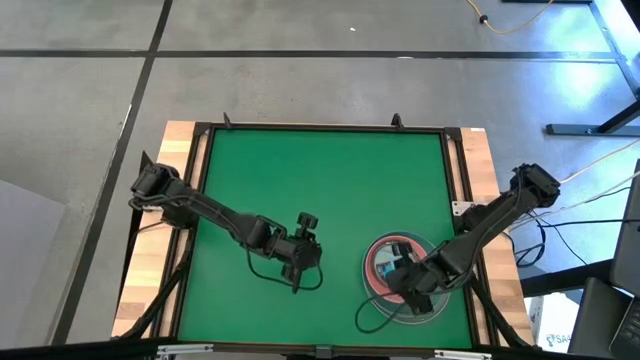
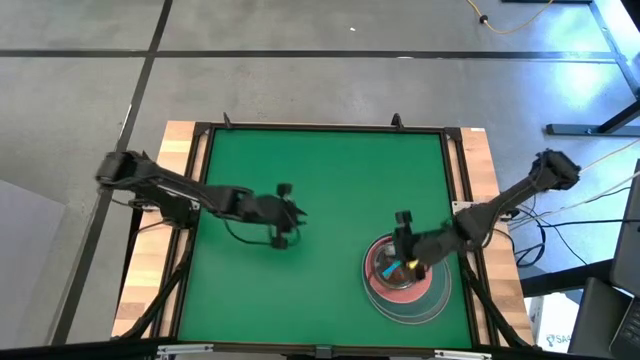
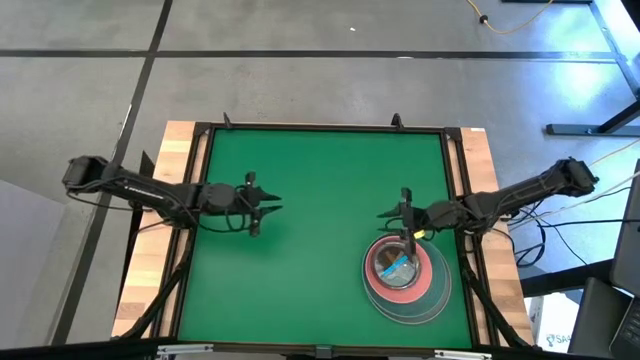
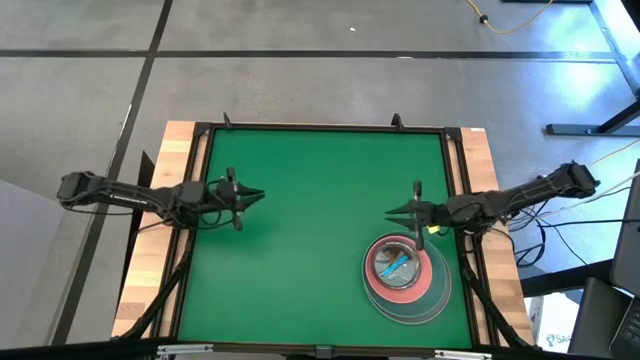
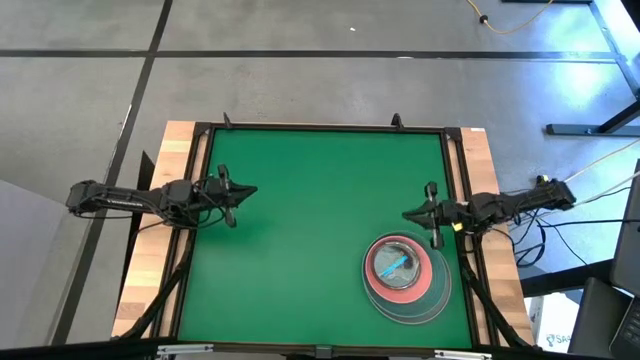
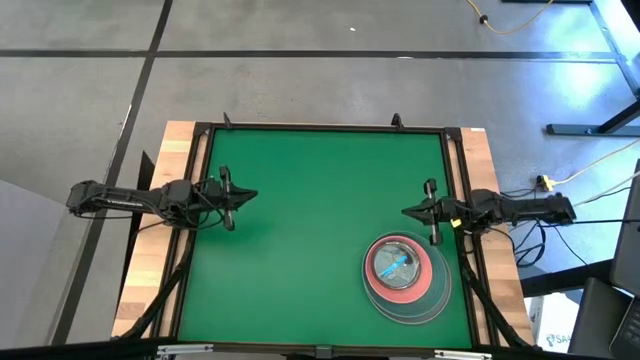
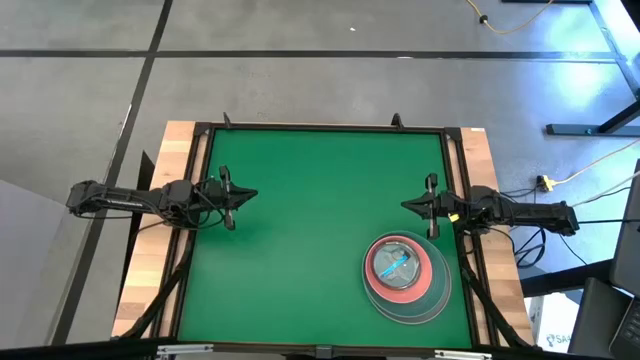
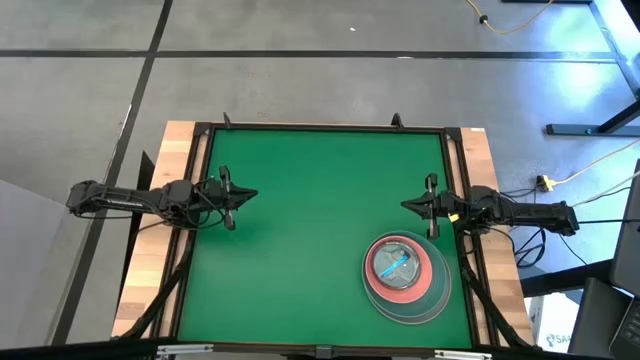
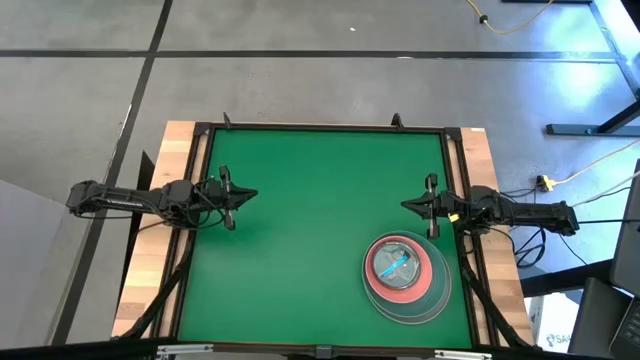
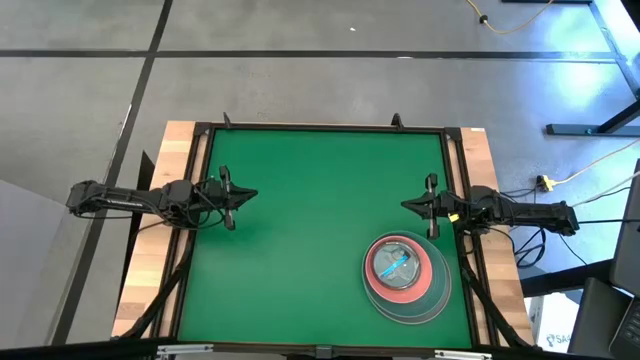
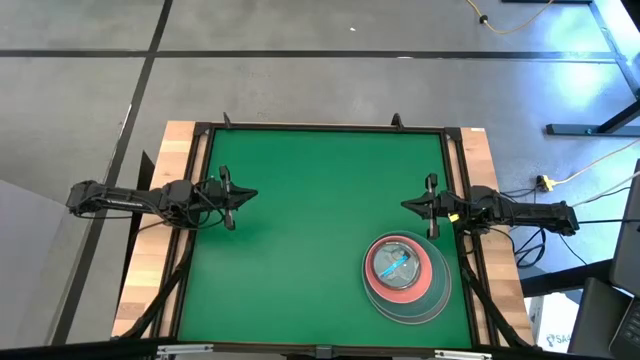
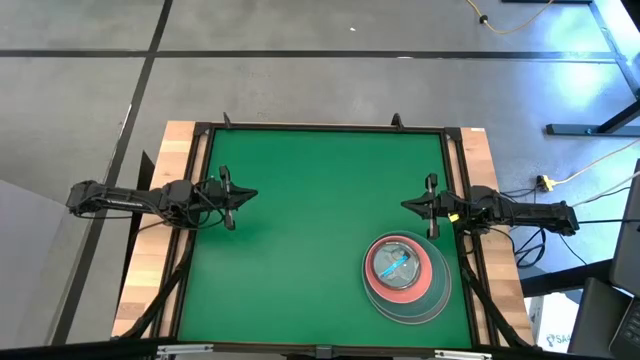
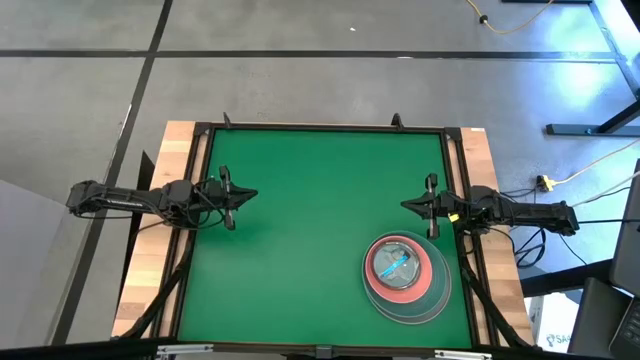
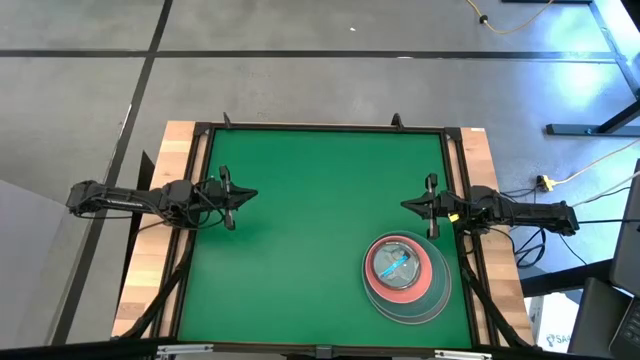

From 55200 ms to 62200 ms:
Task: Stack plastic plates
Return to Home Position

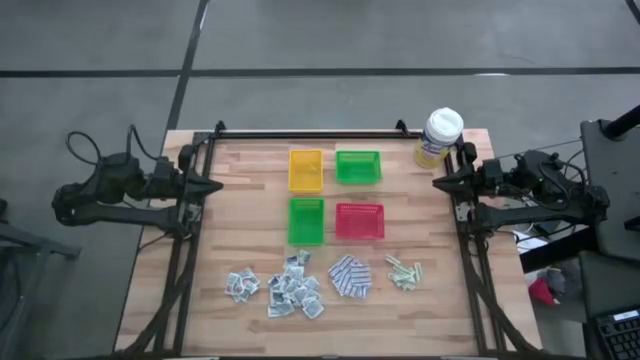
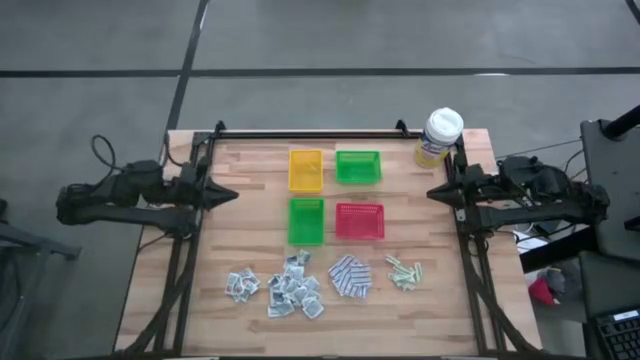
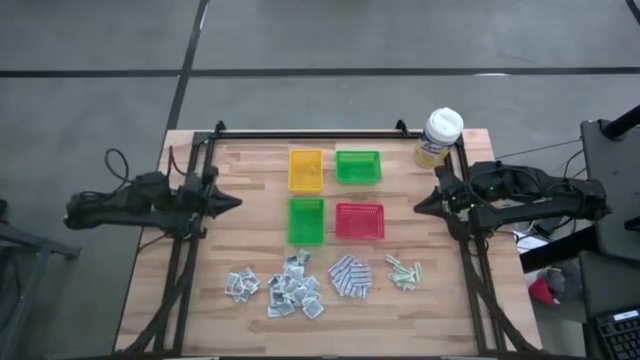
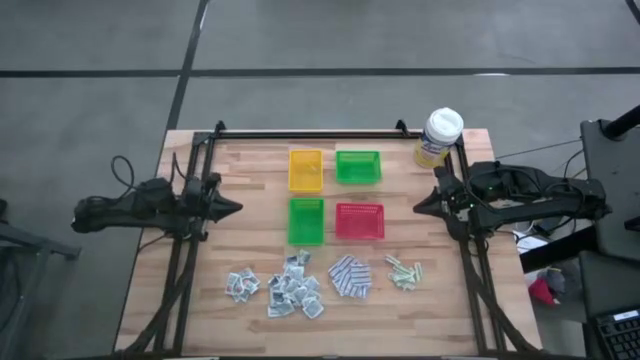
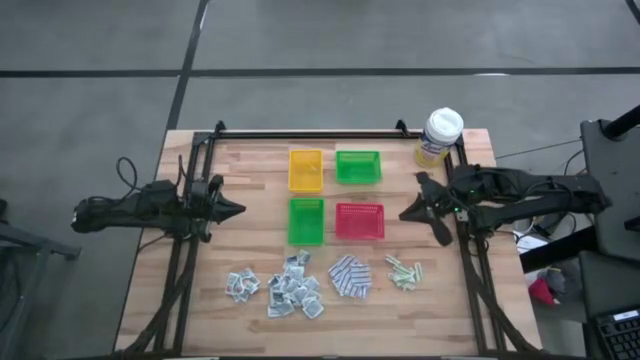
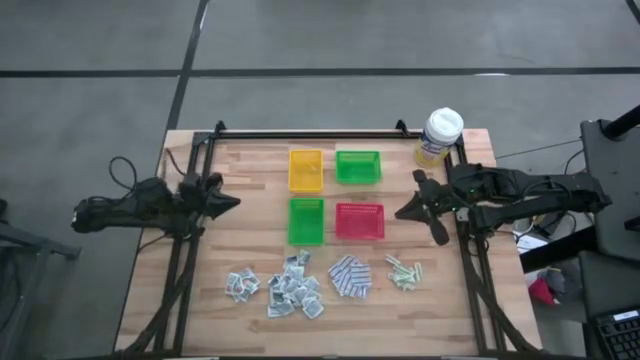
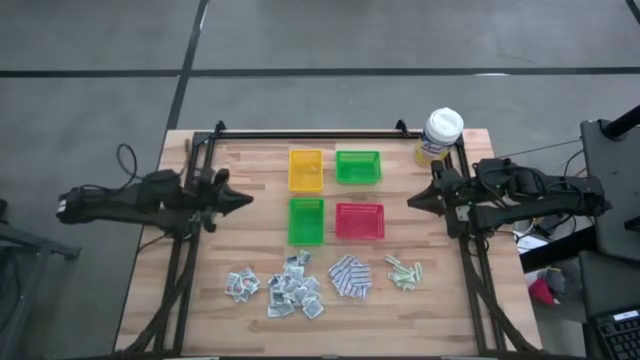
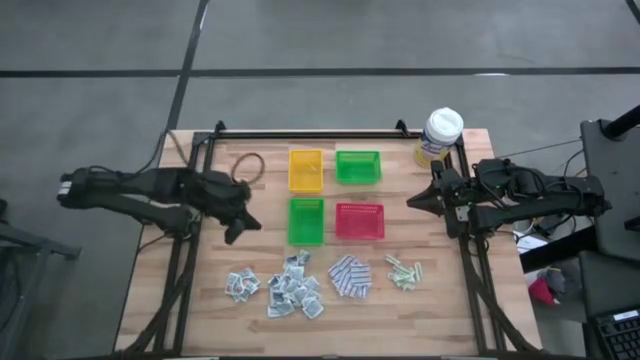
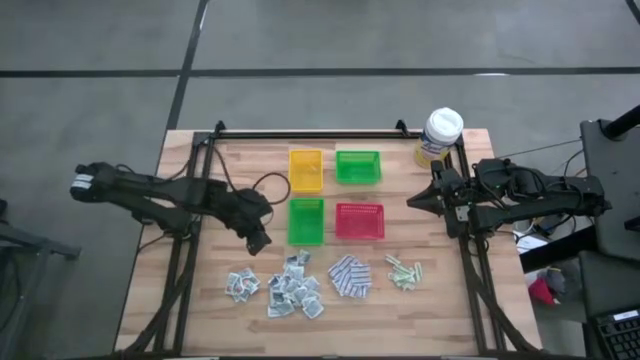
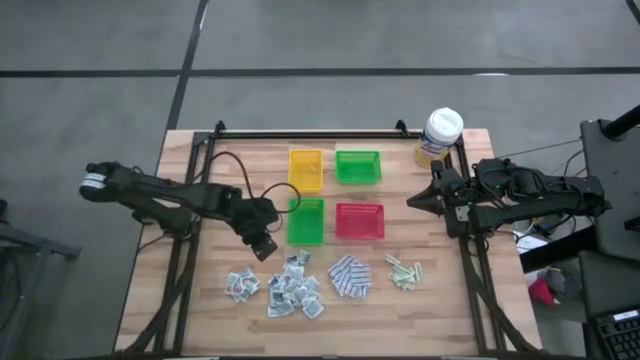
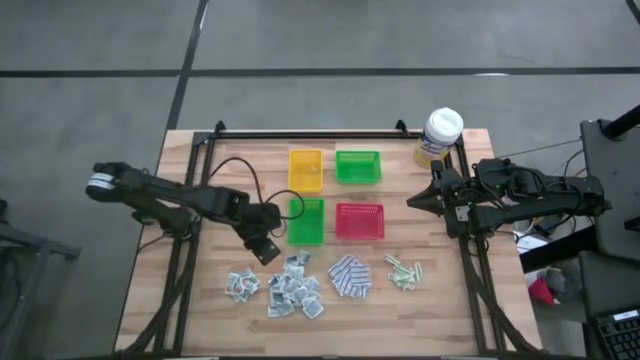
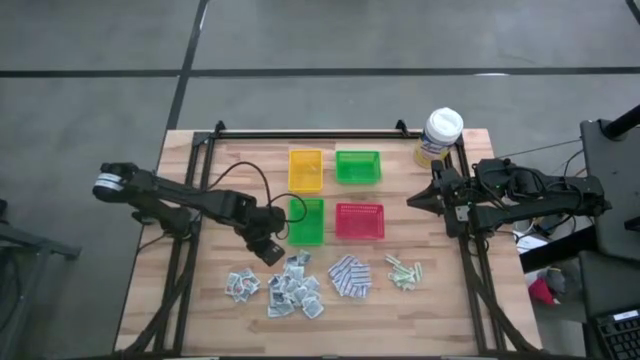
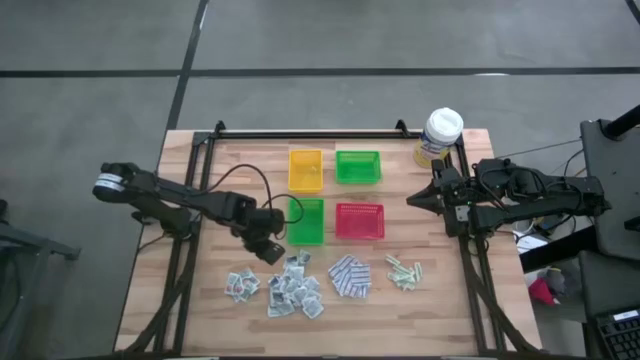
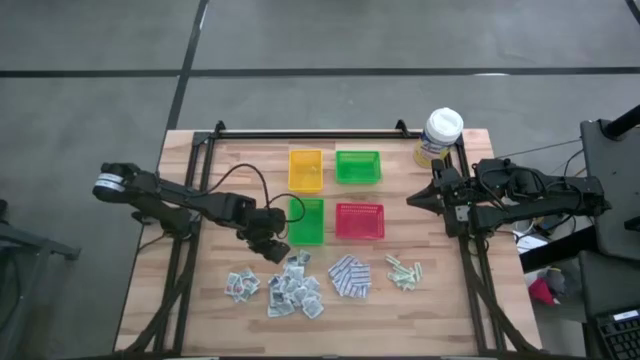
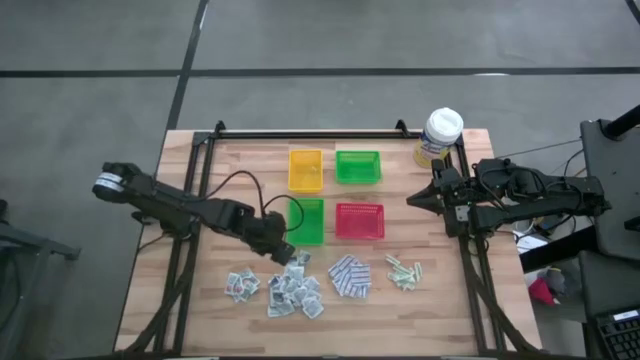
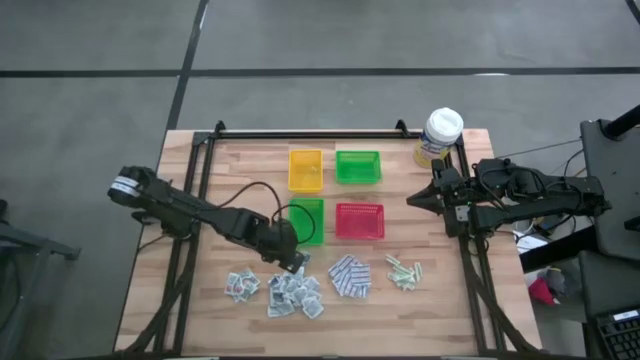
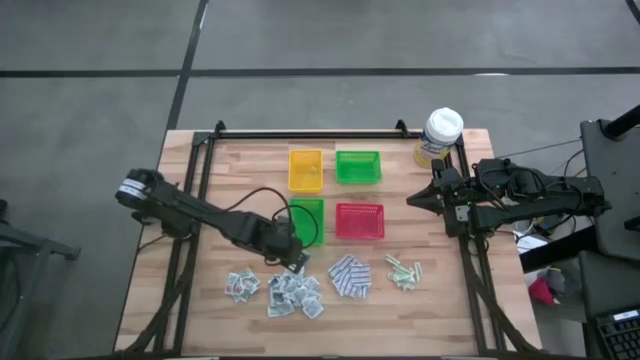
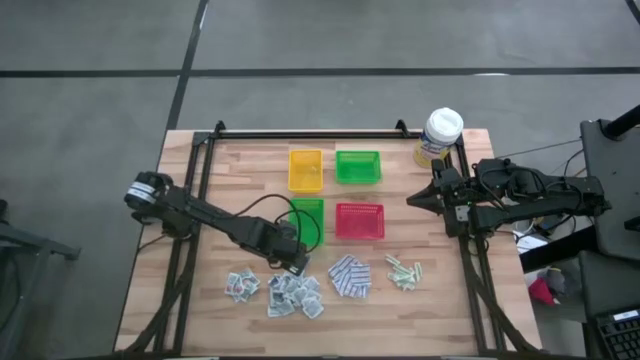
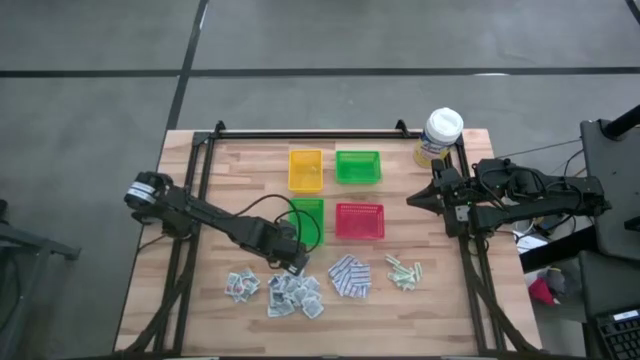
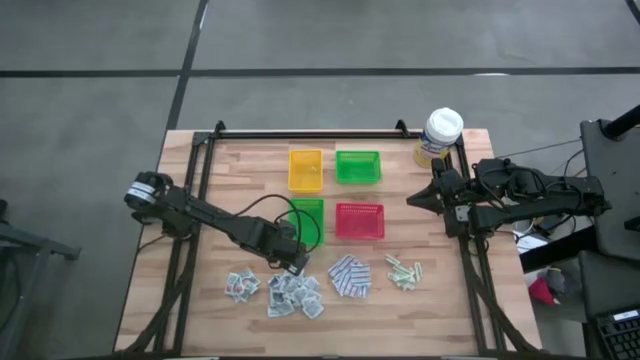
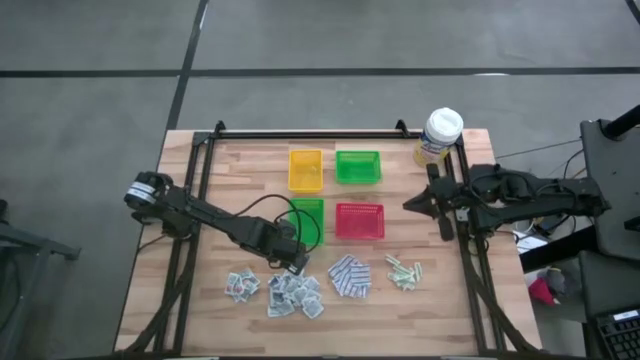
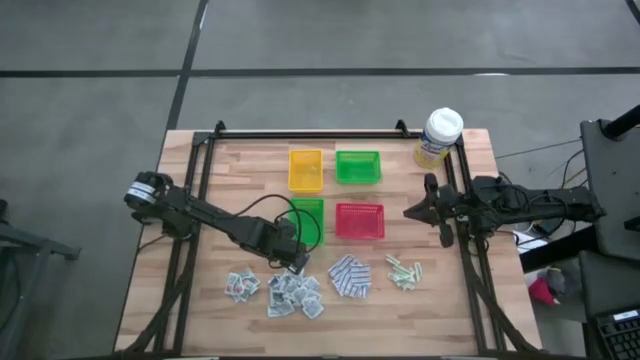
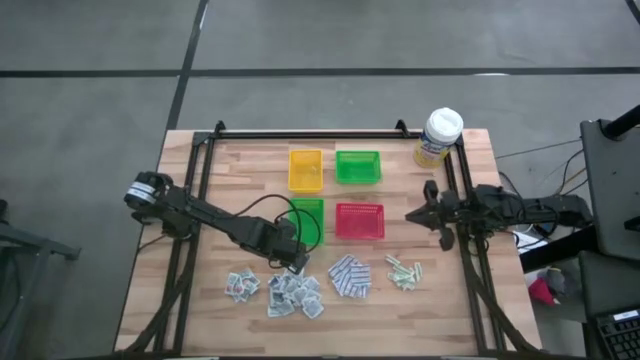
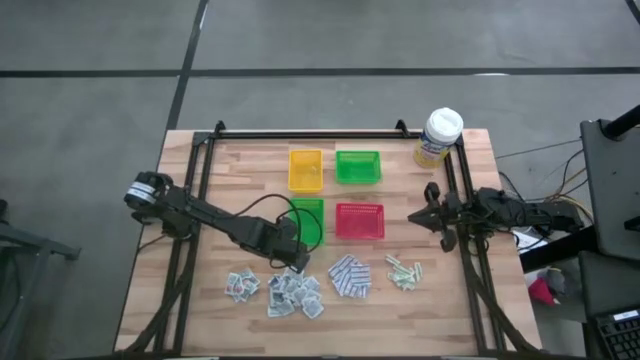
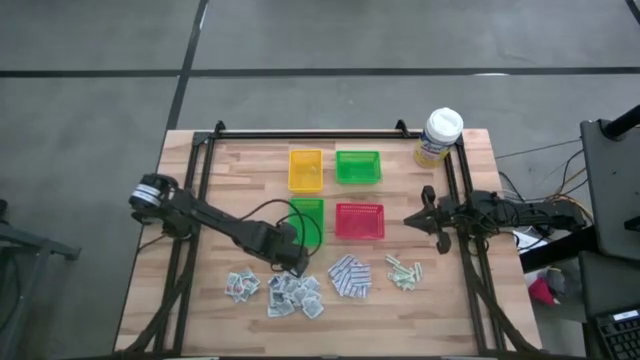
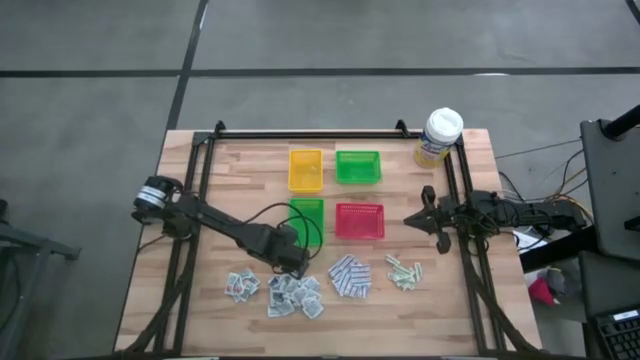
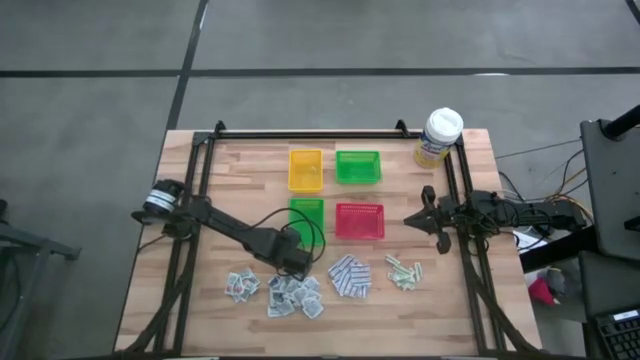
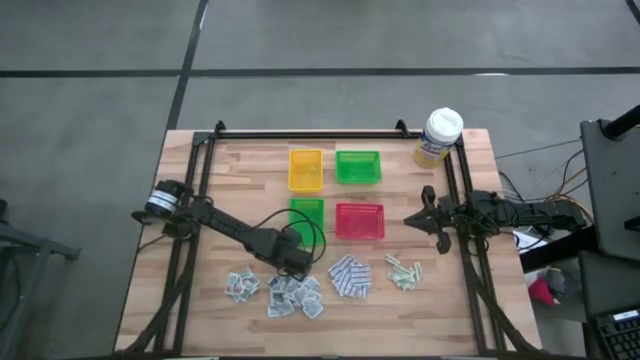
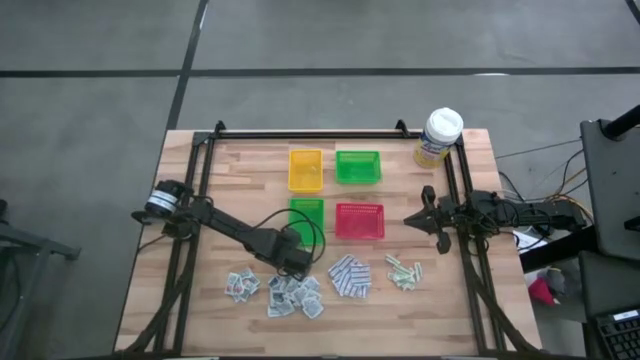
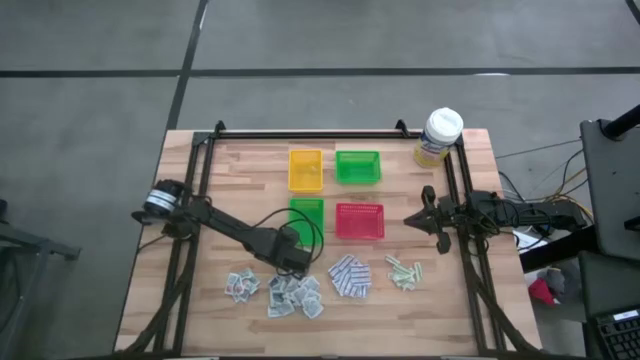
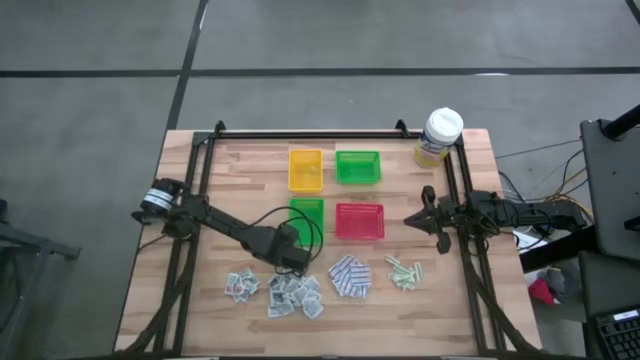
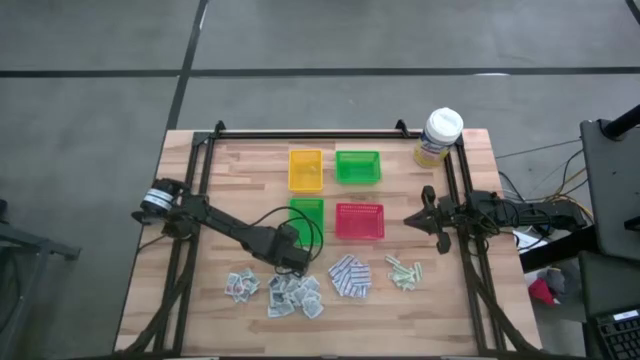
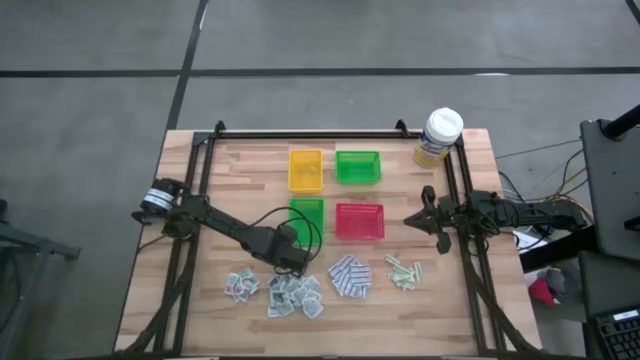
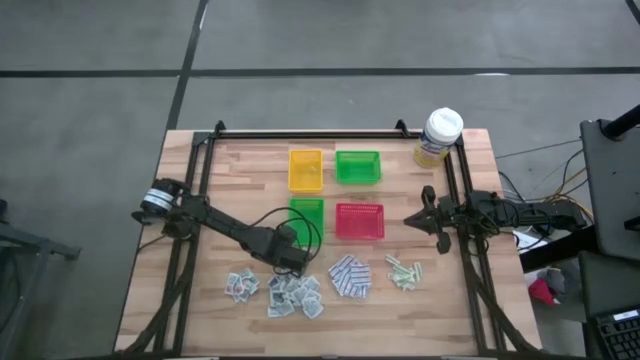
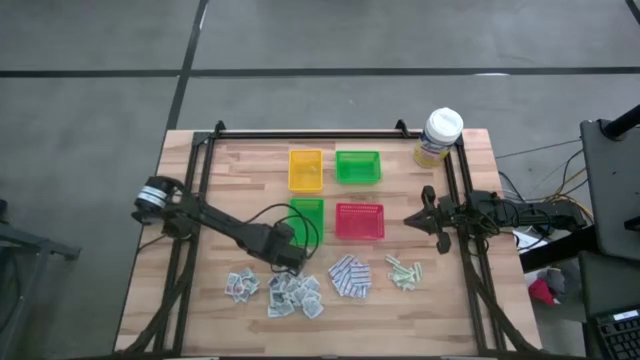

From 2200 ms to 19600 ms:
Task: Pick & Place First Aid Supplies
Put the blue alcohol pad into the yellow bin
